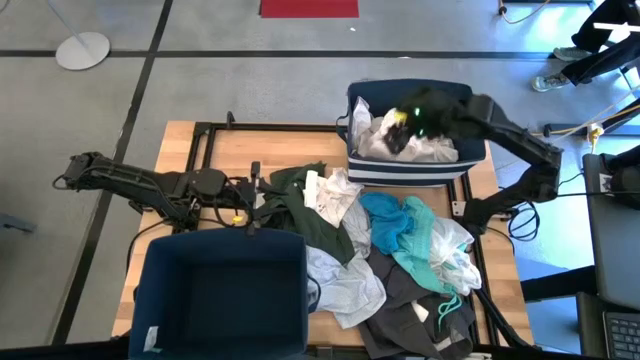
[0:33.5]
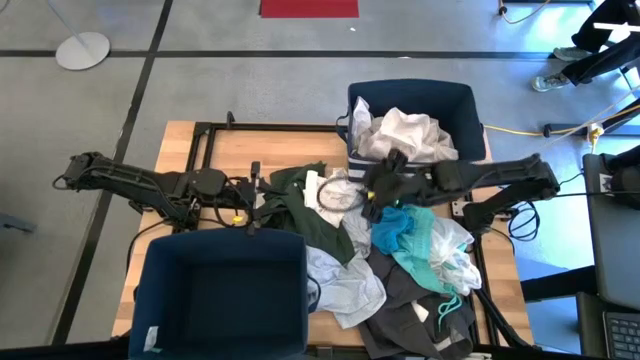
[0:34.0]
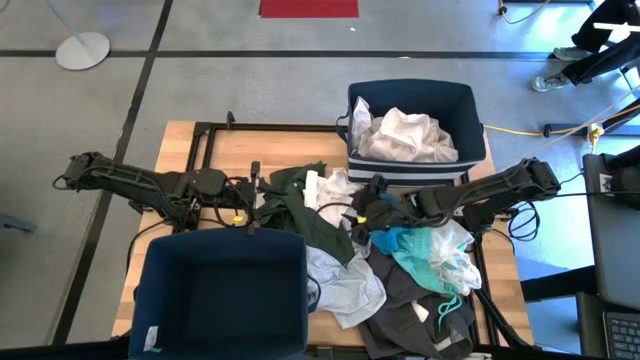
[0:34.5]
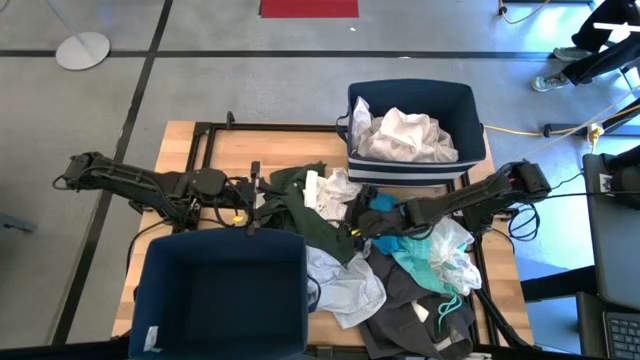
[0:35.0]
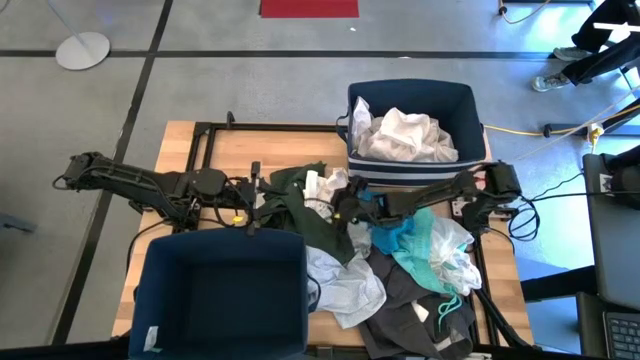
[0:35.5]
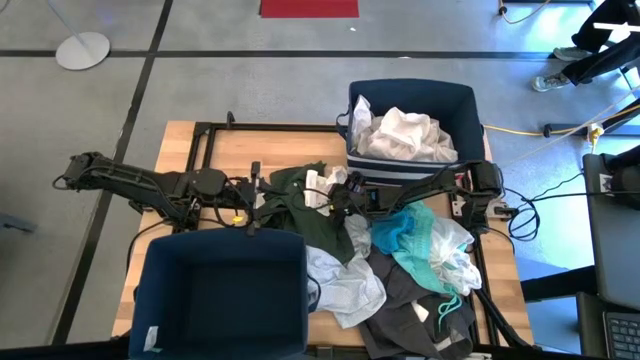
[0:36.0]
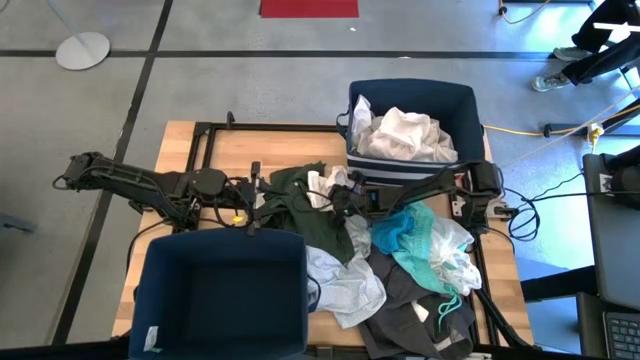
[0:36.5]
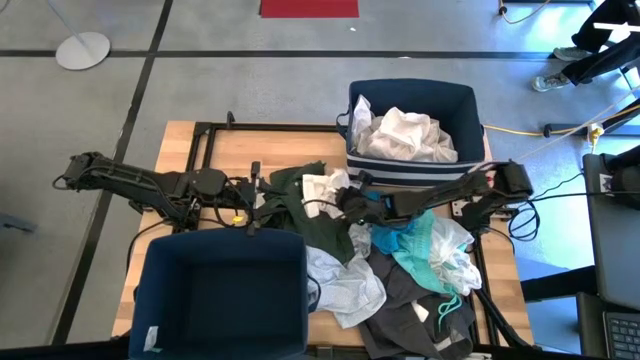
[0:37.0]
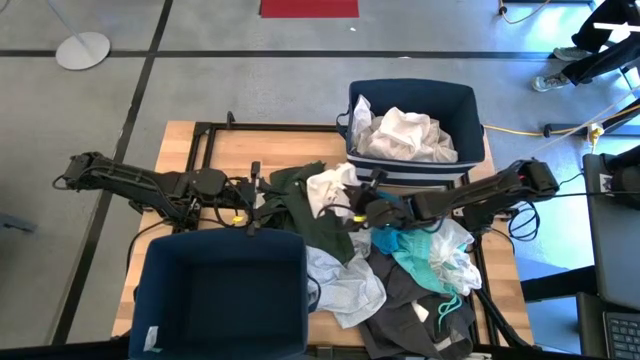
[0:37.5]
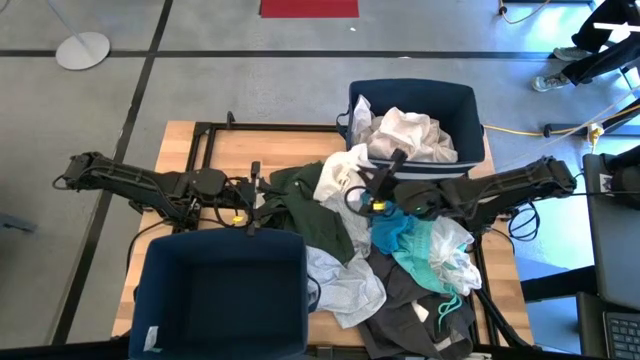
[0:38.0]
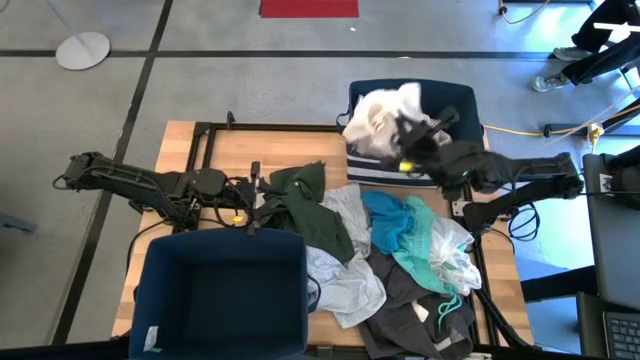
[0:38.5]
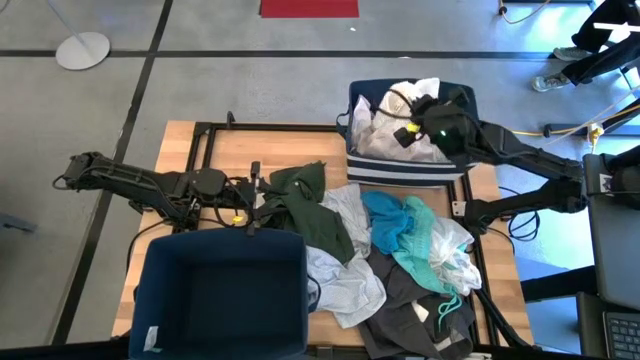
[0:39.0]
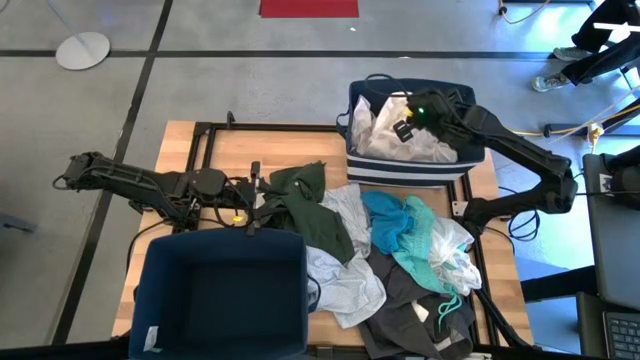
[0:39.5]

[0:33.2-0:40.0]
Task: Sort clothes
Put the white shorts into the top laundry bin

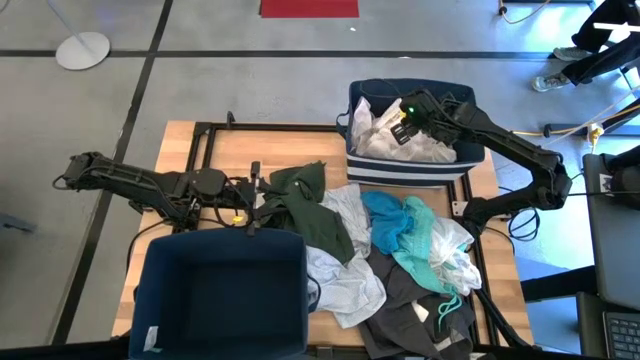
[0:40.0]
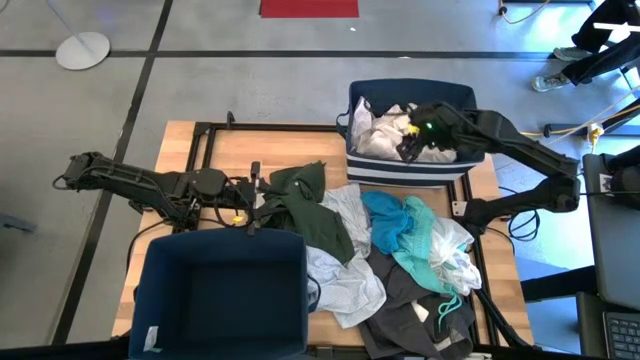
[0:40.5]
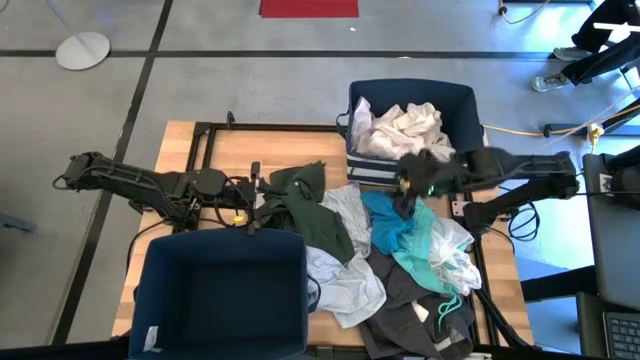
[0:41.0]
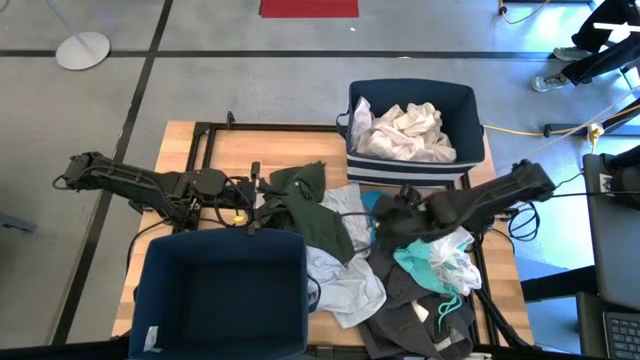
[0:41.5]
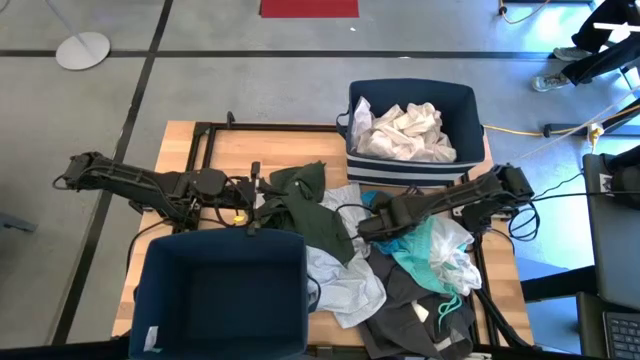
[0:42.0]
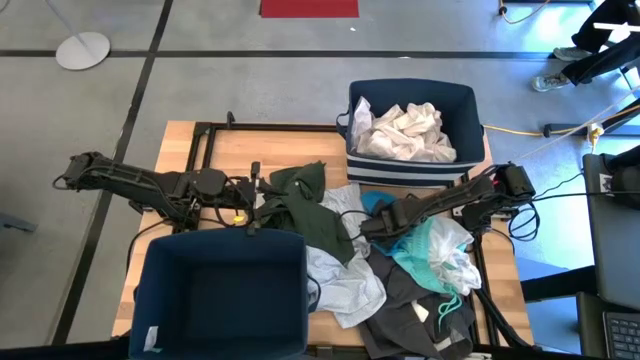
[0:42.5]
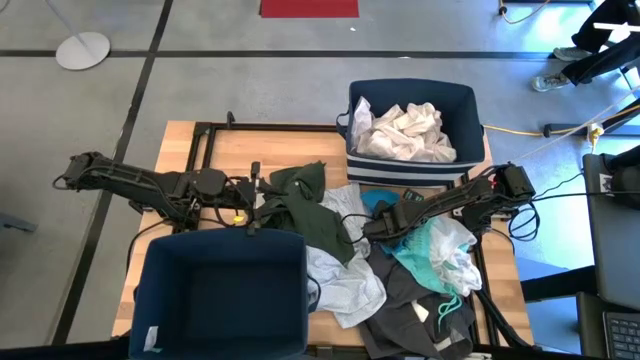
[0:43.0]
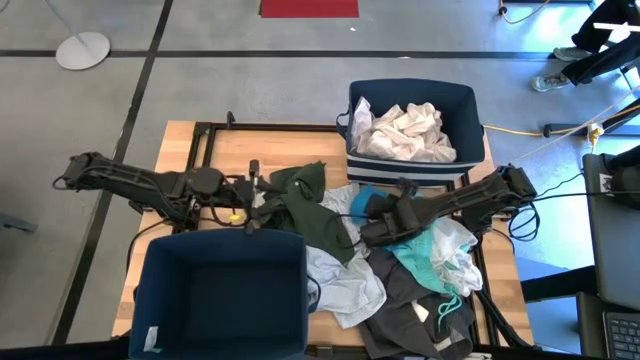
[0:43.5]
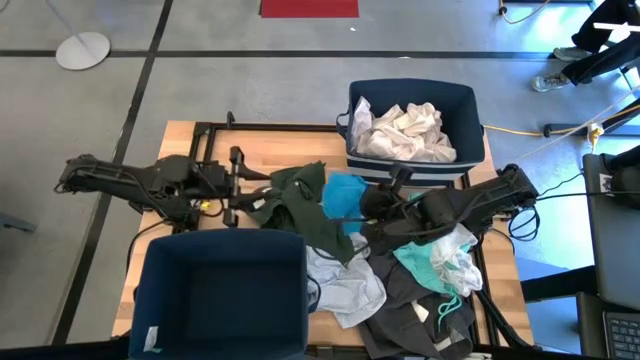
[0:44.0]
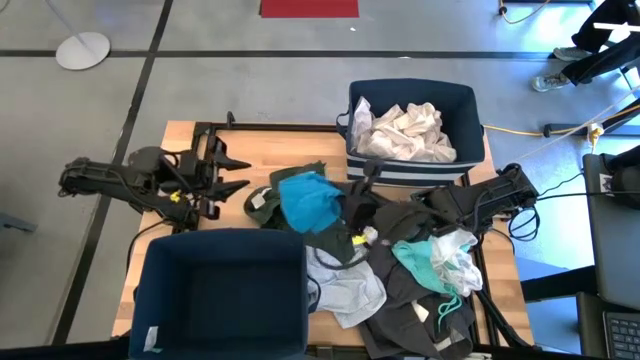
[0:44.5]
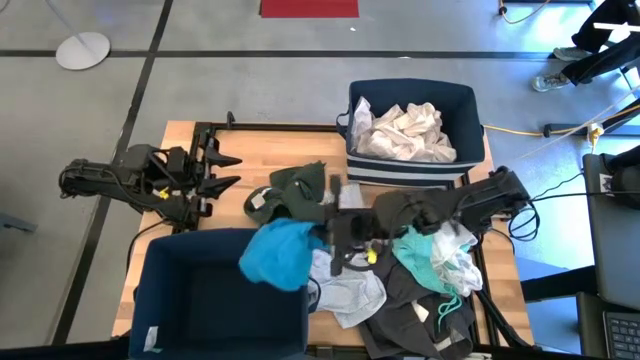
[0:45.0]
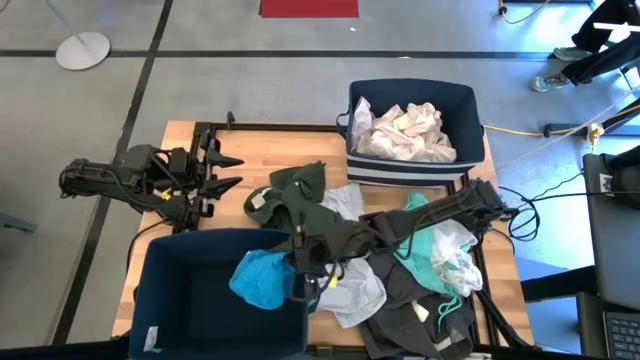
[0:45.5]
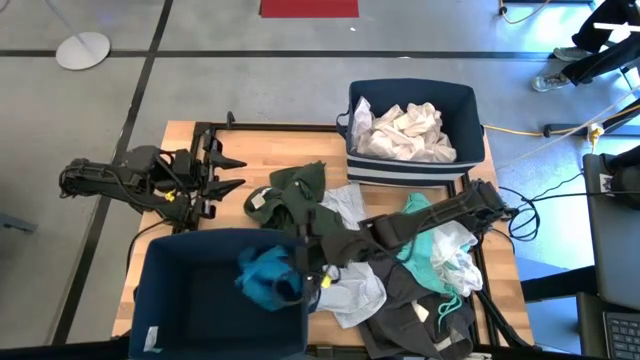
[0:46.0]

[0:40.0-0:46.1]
Put the blue shorts into the bottom laundry bin

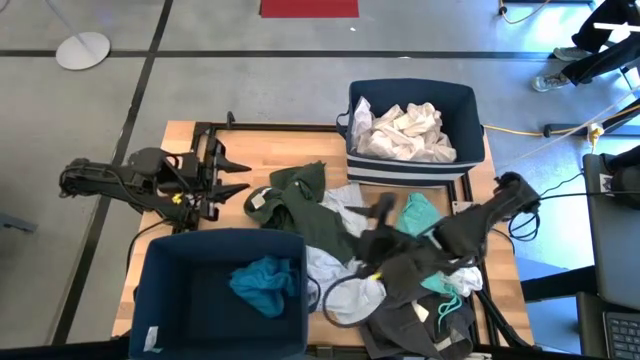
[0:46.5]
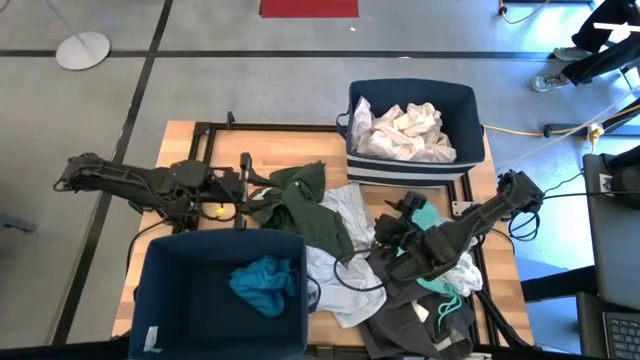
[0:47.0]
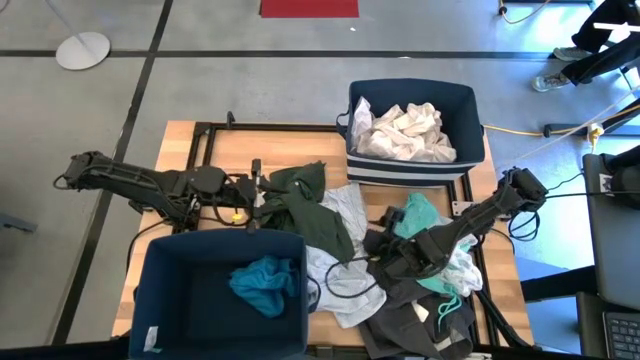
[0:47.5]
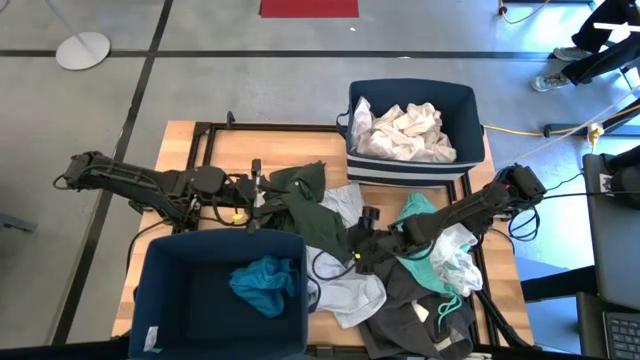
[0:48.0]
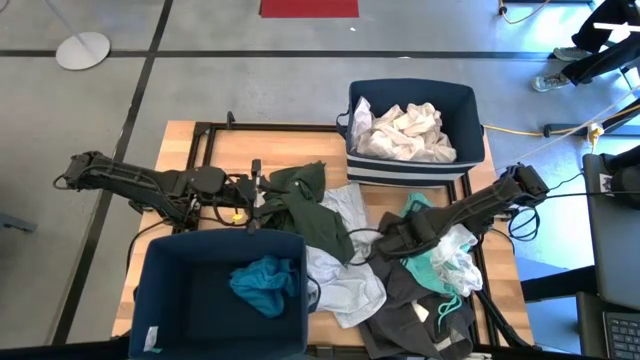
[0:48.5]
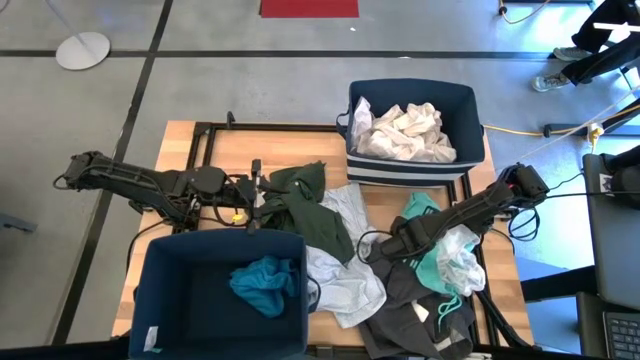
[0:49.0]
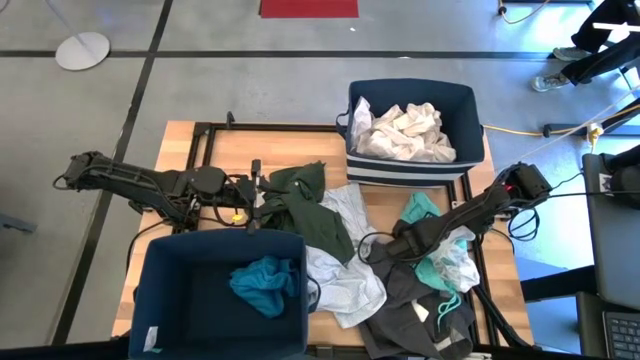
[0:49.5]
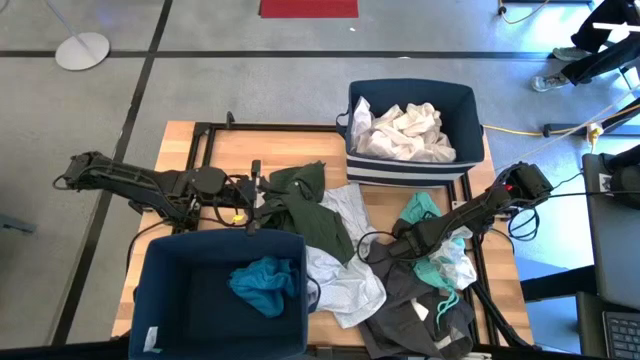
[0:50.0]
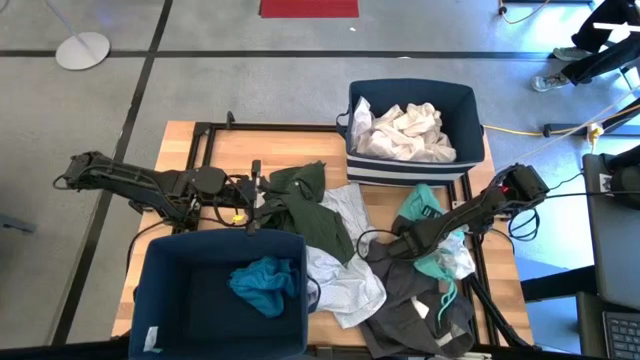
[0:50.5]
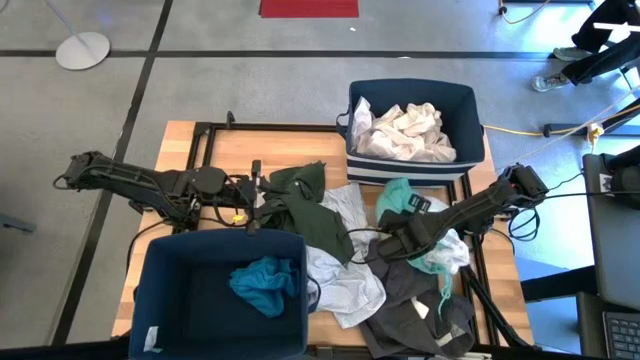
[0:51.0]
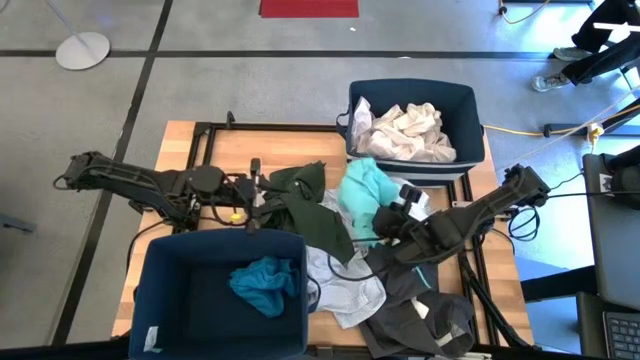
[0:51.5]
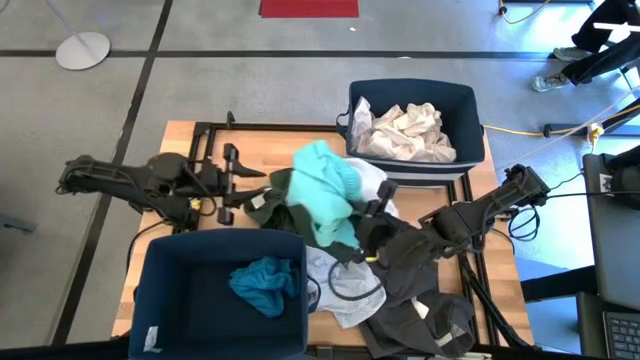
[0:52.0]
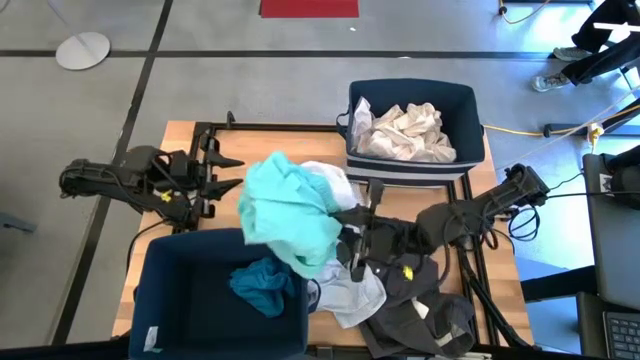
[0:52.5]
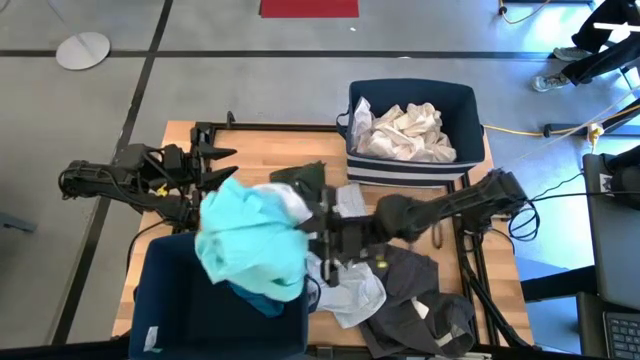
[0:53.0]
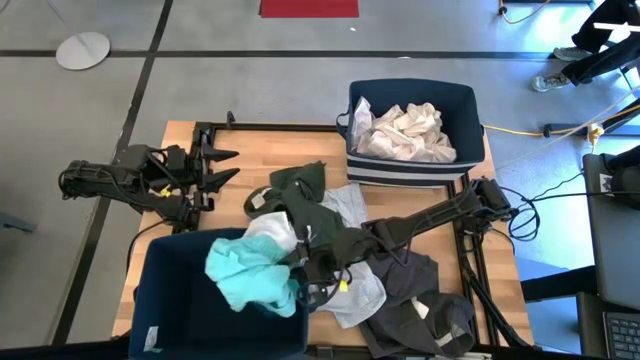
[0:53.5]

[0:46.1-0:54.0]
Put the light green shorts into the bottom laundry bin
